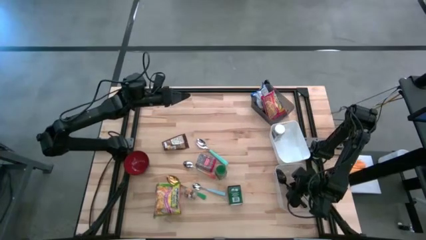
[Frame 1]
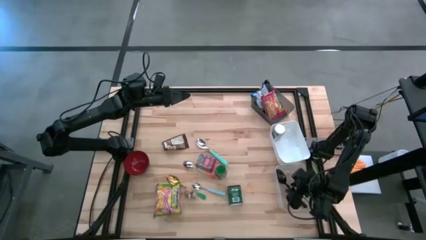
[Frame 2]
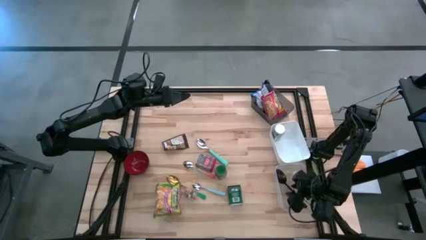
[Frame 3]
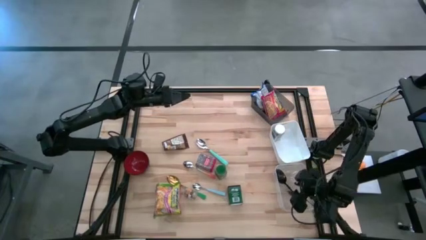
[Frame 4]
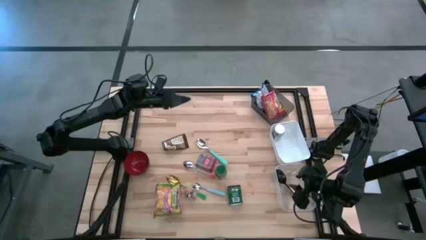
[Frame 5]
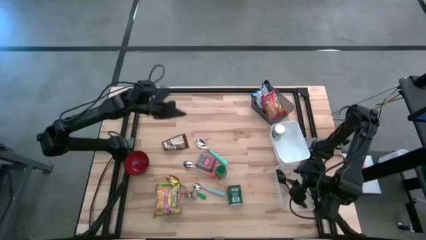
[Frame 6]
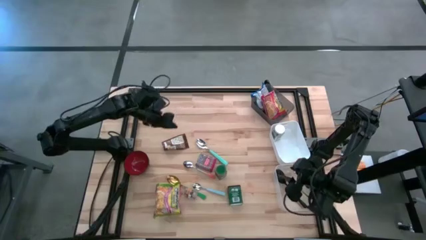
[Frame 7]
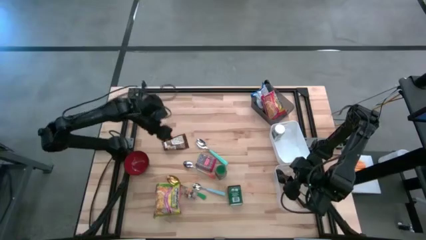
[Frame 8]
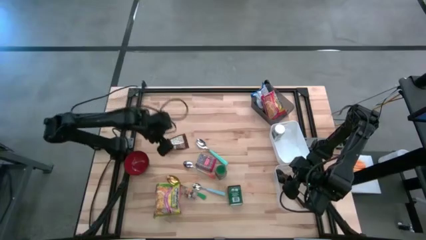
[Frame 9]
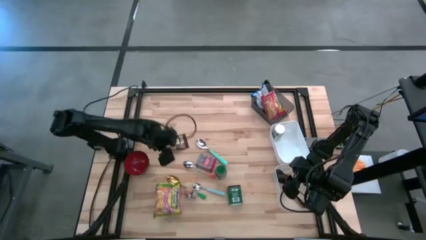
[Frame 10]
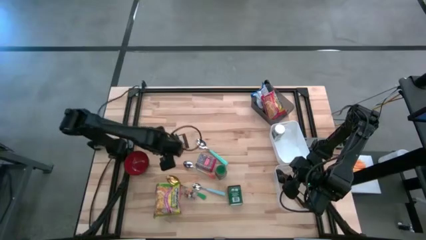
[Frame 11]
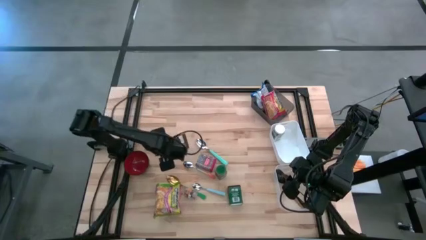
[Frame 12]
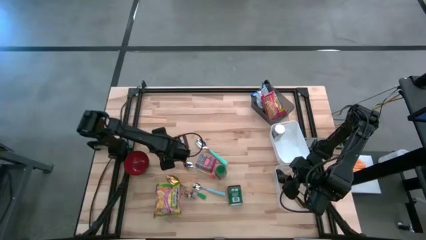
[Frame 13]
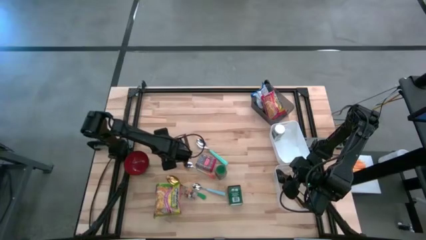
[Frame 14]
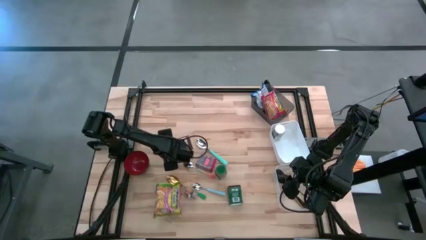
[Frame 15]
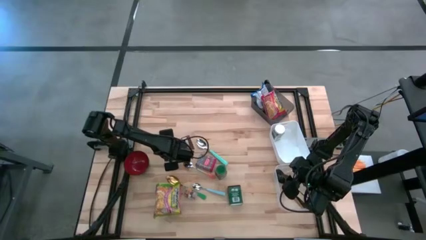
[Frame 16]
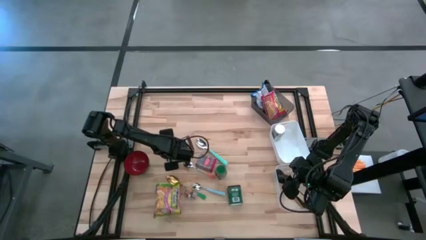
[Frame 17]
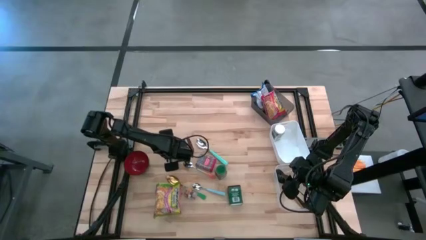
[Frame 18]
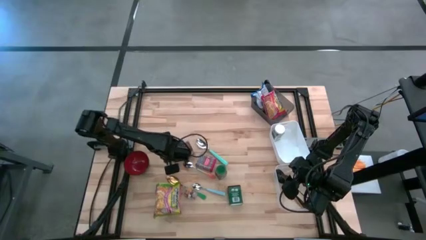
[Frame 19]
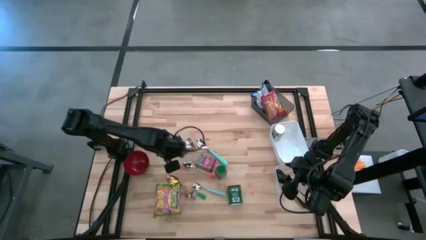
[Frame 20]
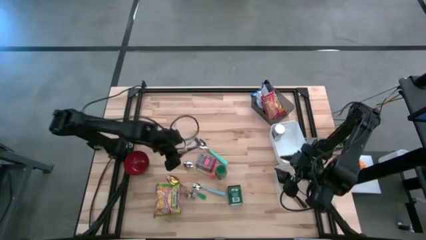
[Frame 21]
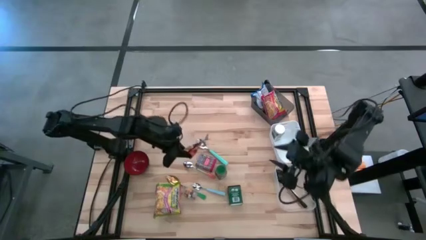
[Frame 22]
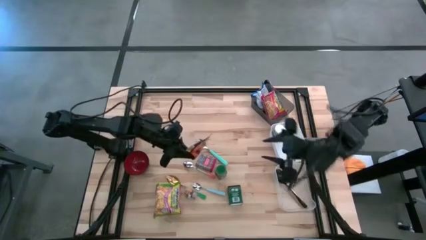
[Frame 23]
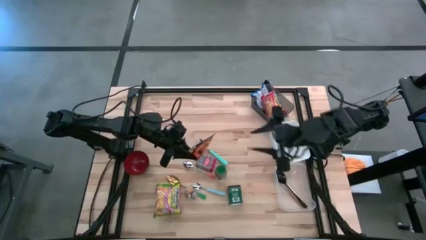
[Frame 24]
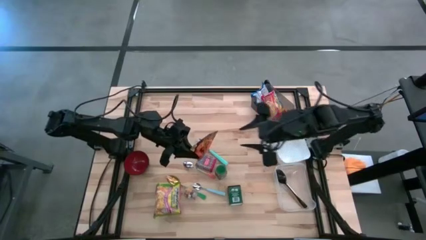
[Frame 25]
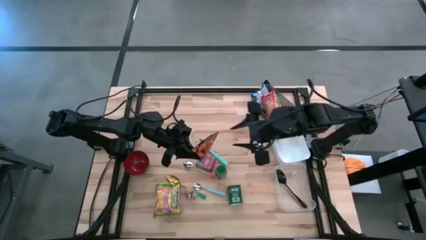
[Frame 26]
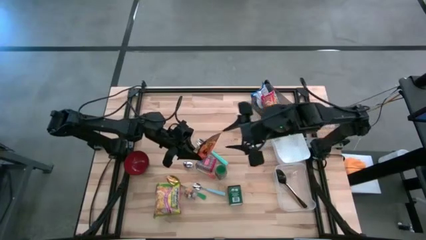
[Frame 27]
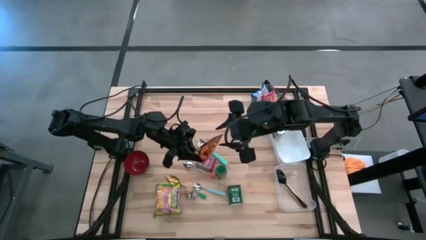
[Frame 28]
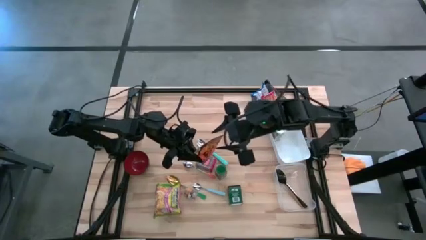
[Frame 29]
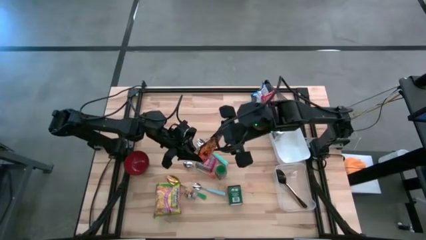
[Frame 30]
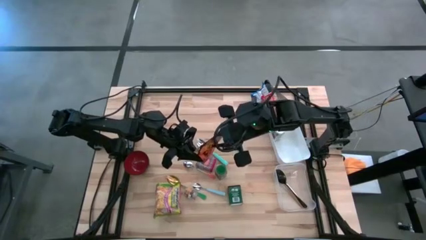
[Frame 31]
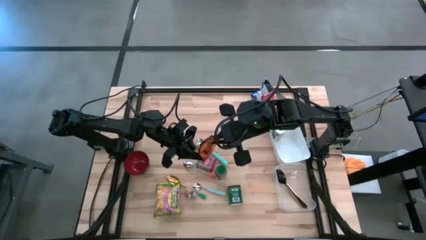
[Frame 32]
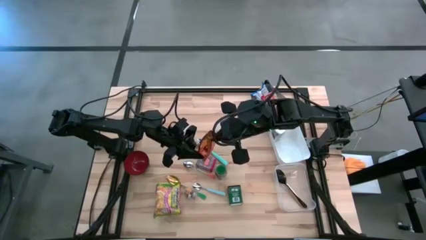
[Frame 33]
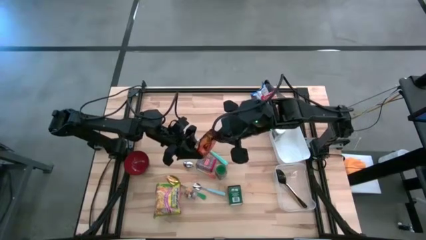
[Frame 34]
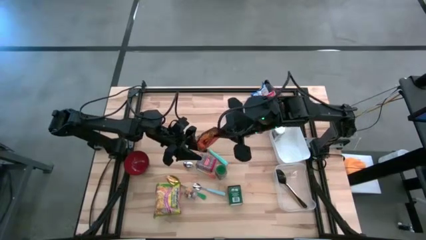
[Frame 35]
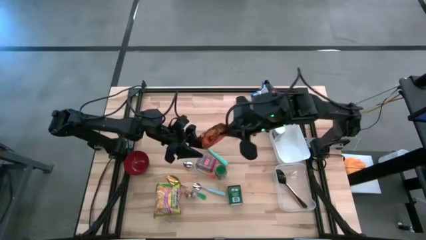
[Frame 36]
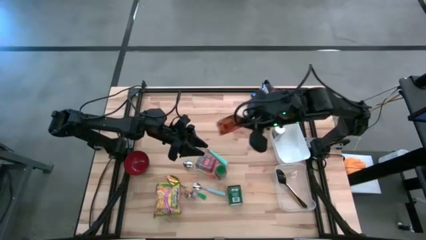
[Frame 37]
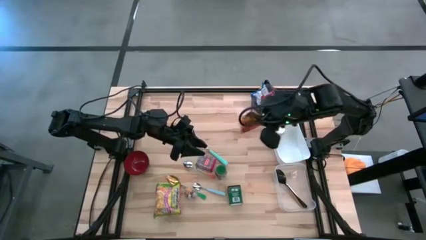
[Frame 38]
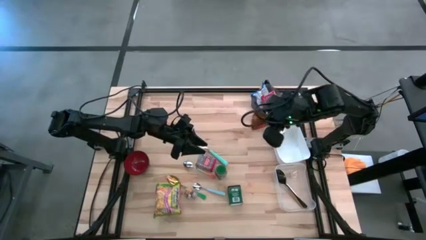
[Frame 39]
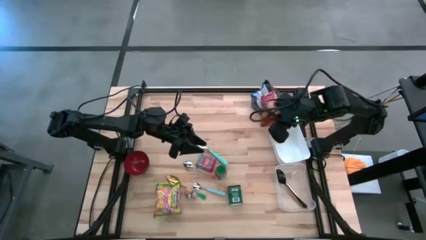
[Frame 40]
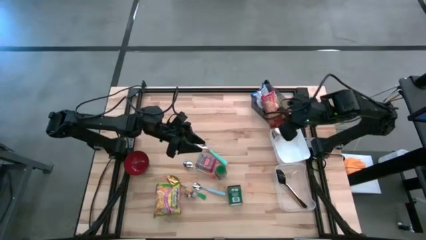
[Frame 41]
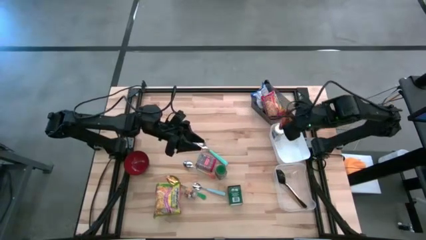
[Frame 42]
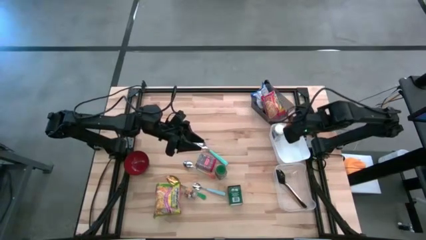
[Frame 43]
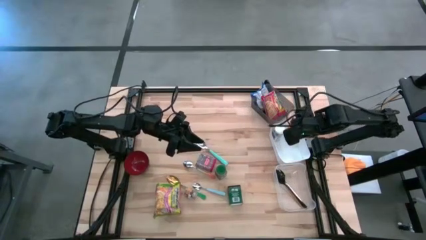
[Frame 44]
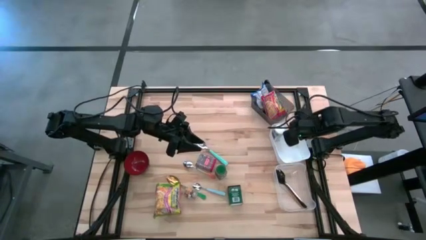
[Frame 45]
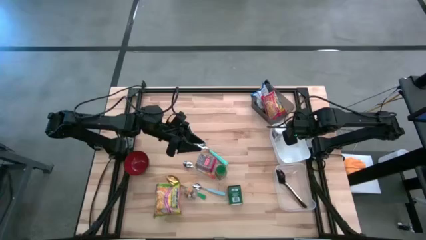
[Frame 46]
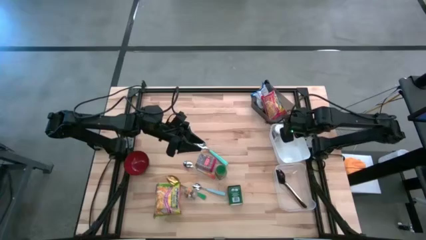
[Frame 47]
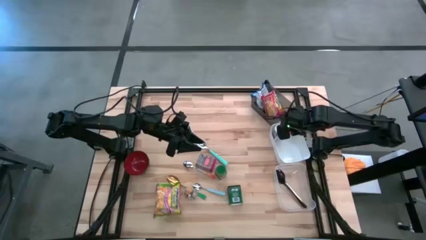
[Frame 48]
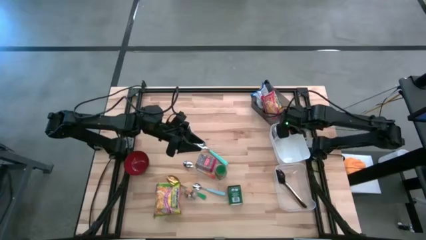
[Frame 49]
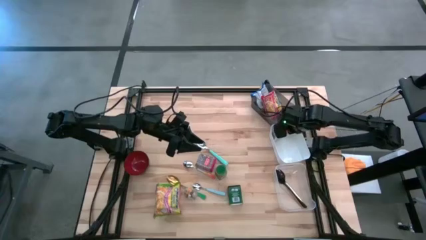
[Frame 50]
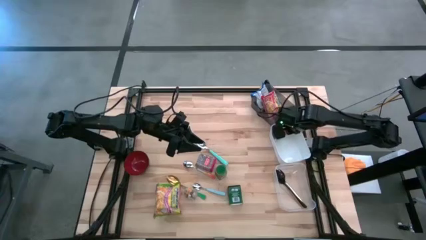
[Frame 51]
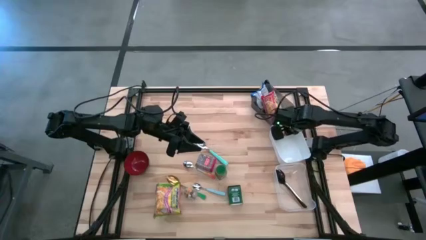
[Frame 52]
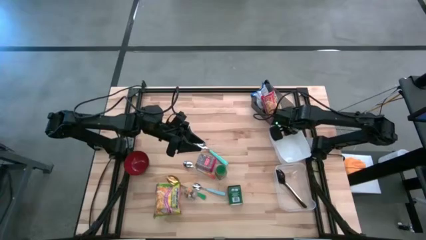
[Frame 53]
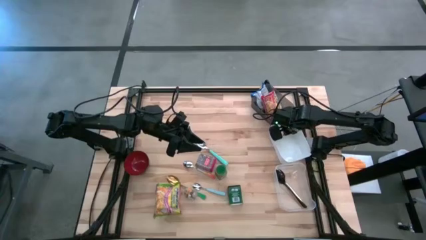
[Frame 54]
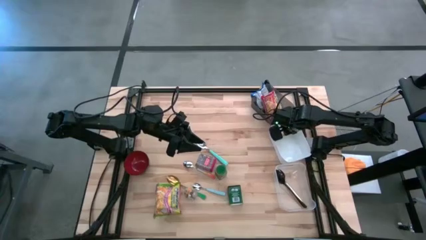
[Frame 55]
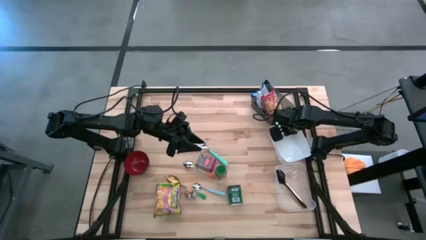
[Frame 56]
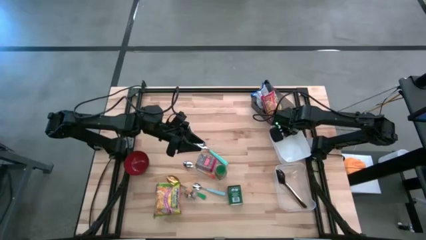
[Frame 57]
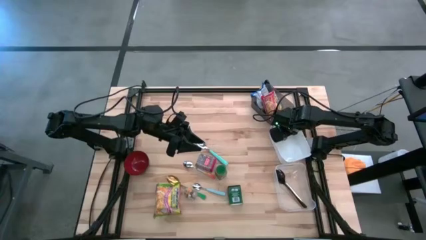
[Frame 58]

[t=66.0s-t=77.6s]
Put the orange seasoning pack into the white bin
